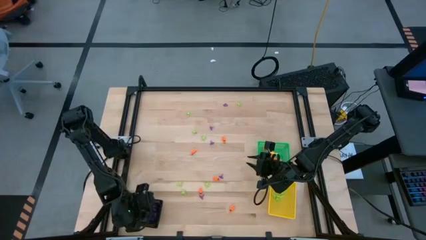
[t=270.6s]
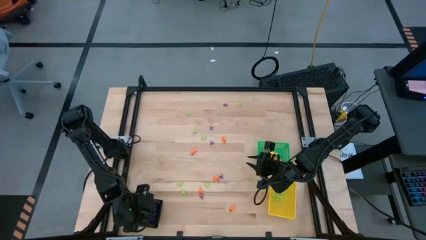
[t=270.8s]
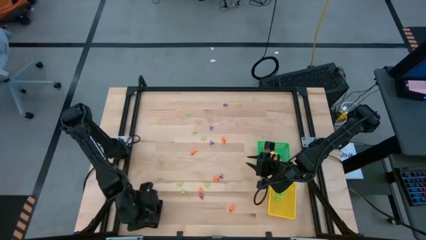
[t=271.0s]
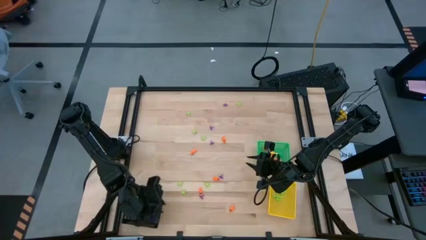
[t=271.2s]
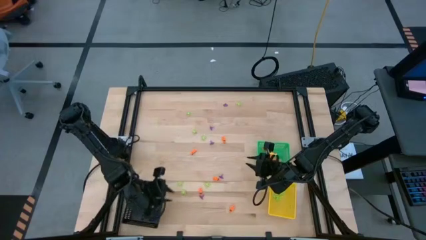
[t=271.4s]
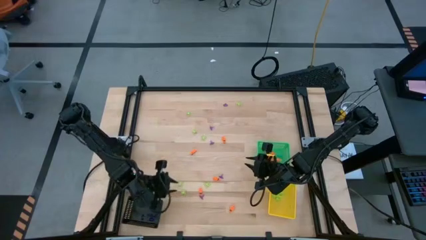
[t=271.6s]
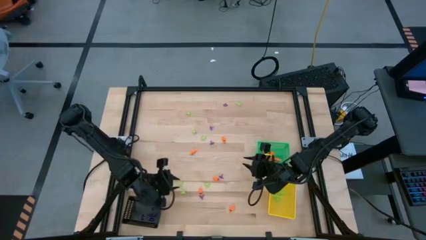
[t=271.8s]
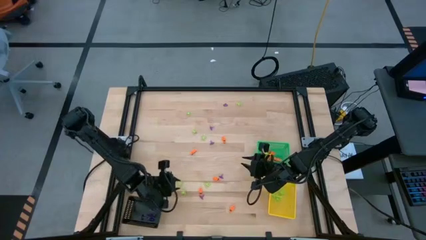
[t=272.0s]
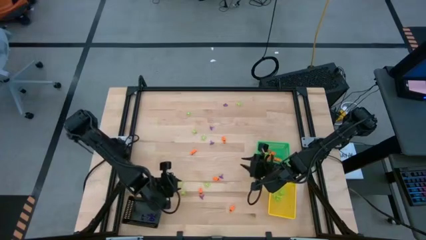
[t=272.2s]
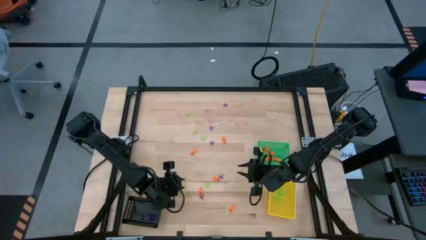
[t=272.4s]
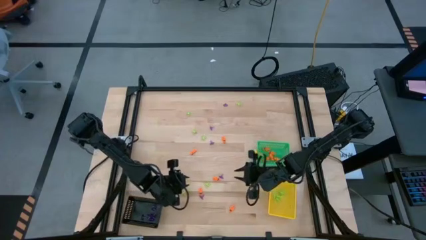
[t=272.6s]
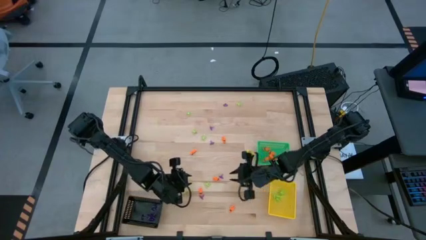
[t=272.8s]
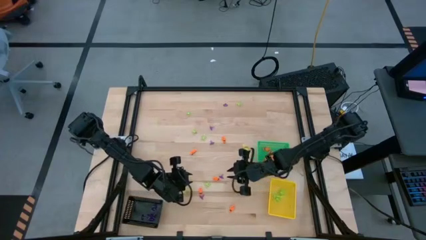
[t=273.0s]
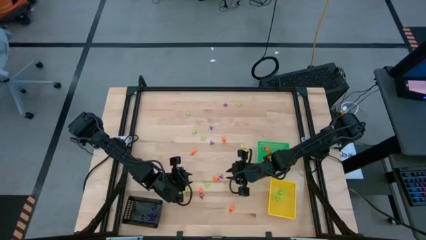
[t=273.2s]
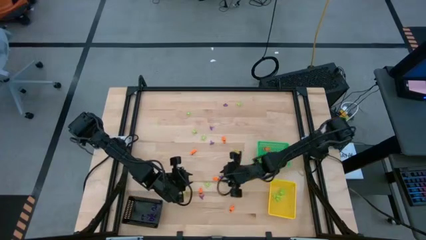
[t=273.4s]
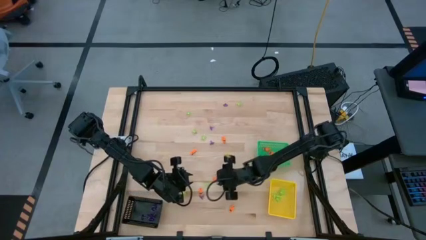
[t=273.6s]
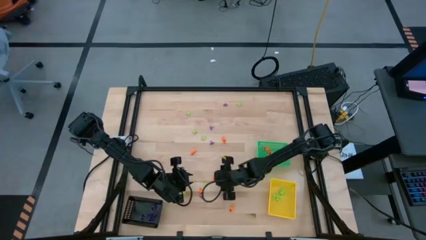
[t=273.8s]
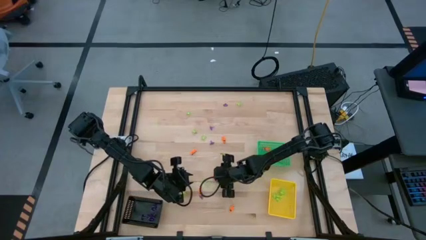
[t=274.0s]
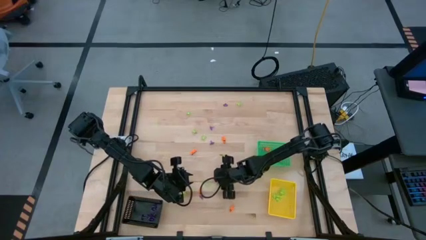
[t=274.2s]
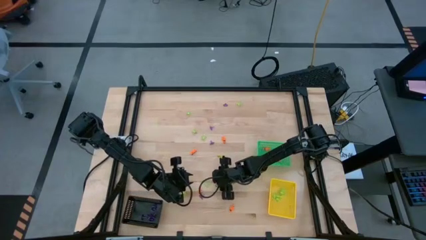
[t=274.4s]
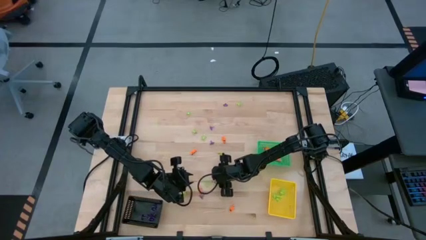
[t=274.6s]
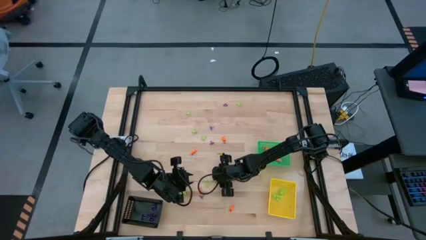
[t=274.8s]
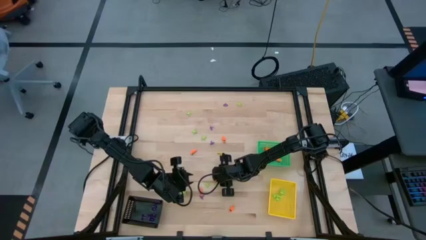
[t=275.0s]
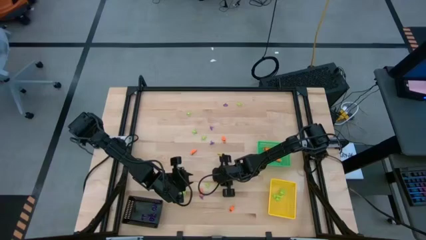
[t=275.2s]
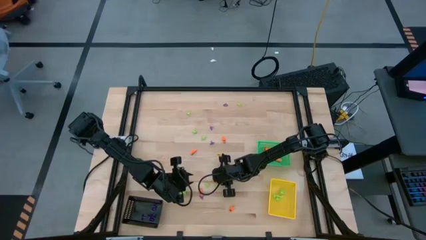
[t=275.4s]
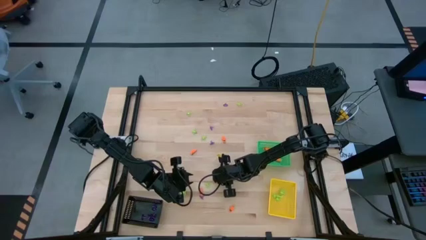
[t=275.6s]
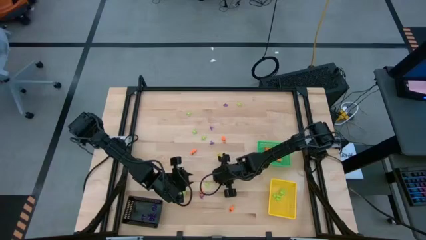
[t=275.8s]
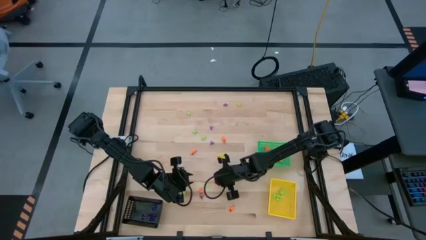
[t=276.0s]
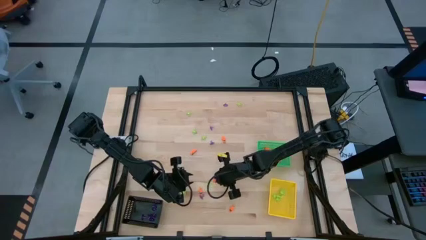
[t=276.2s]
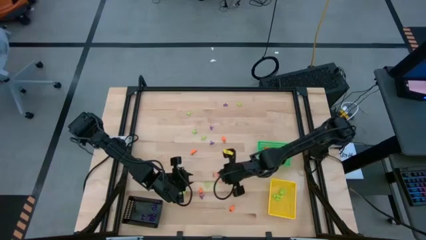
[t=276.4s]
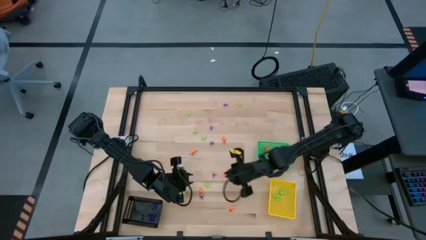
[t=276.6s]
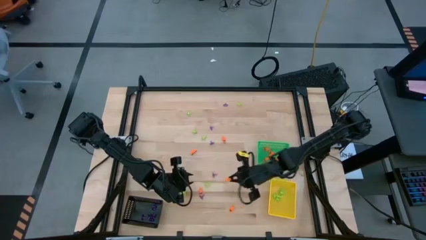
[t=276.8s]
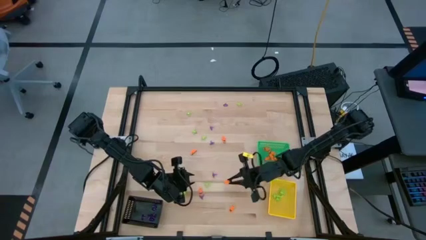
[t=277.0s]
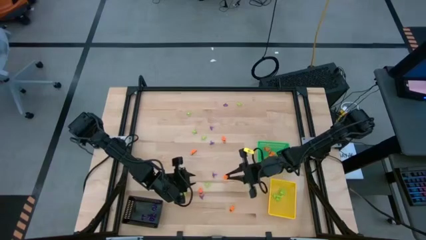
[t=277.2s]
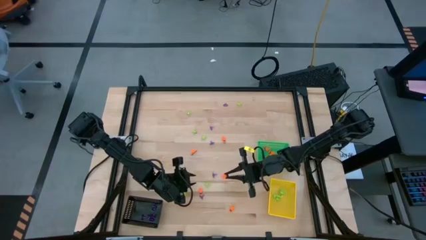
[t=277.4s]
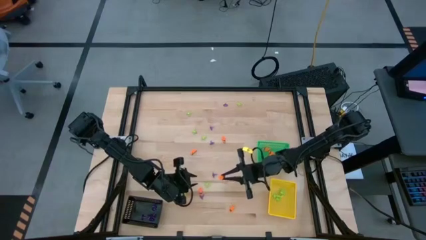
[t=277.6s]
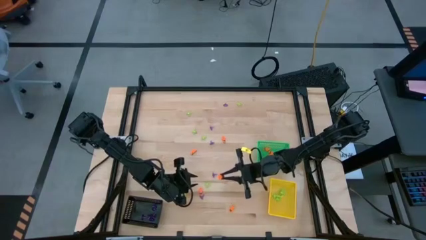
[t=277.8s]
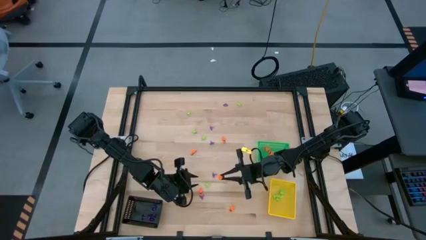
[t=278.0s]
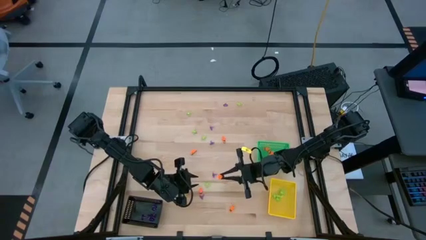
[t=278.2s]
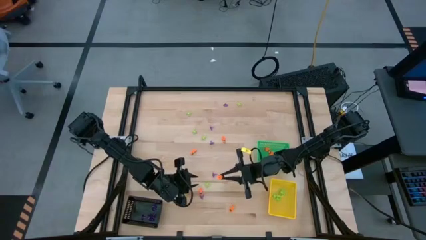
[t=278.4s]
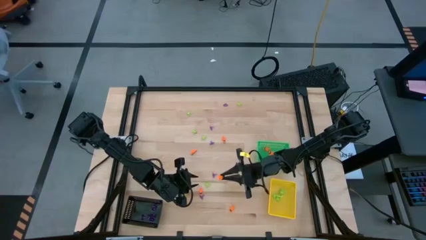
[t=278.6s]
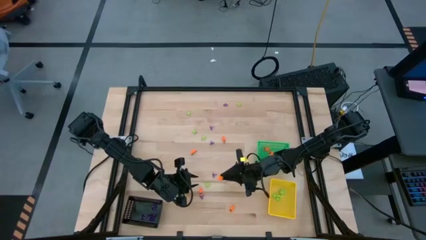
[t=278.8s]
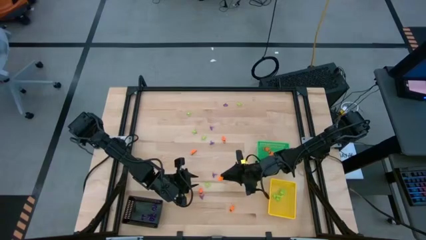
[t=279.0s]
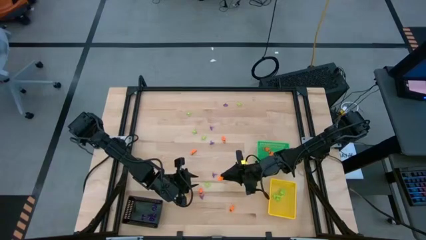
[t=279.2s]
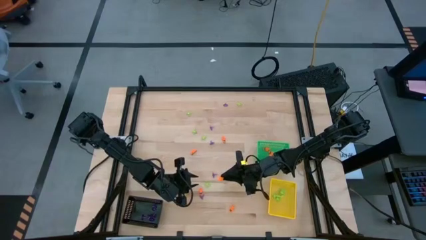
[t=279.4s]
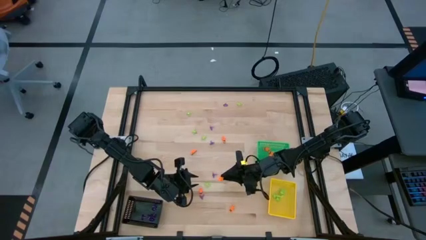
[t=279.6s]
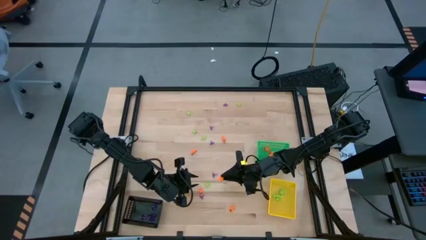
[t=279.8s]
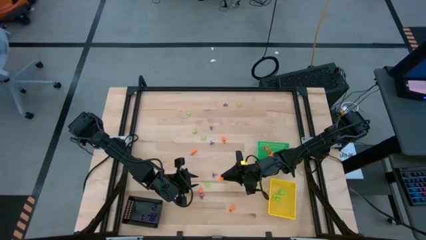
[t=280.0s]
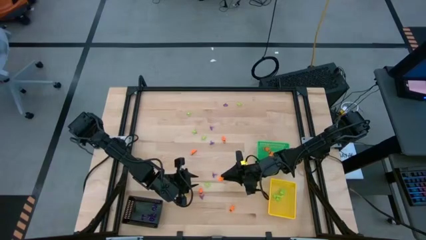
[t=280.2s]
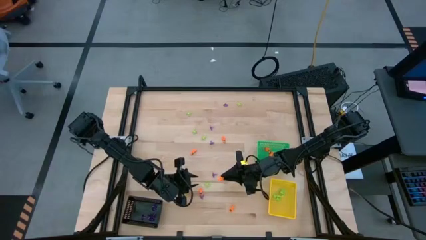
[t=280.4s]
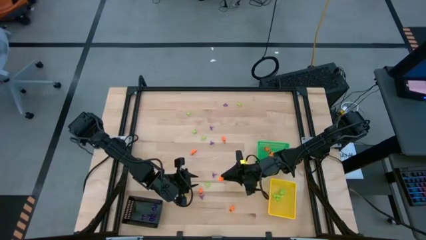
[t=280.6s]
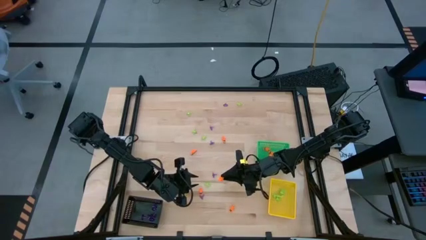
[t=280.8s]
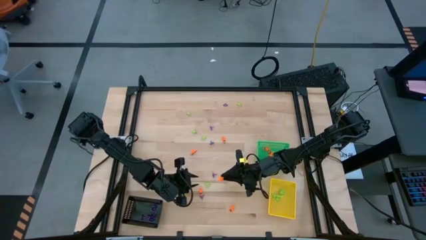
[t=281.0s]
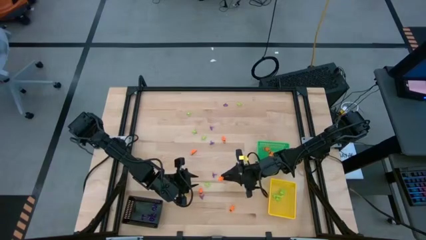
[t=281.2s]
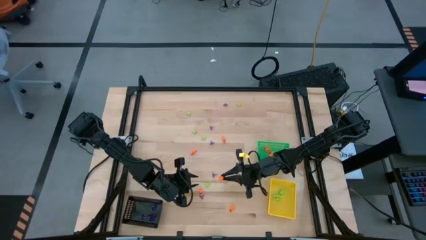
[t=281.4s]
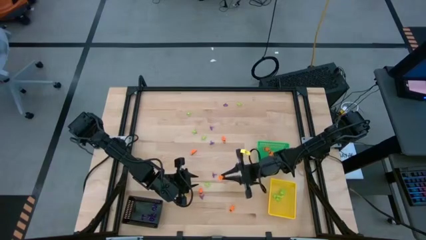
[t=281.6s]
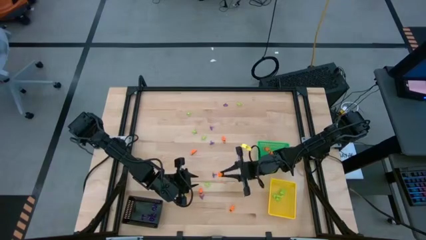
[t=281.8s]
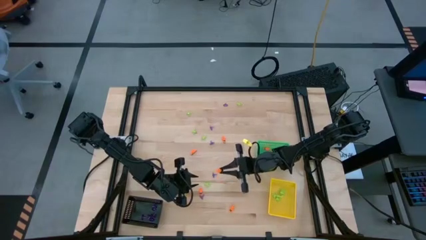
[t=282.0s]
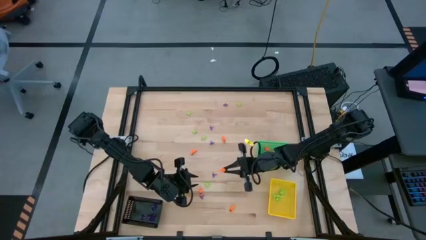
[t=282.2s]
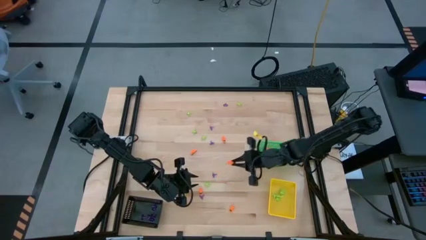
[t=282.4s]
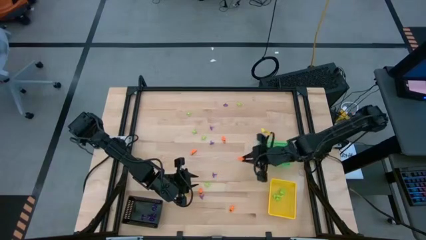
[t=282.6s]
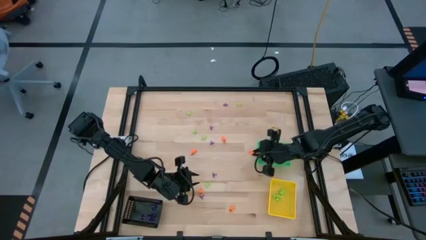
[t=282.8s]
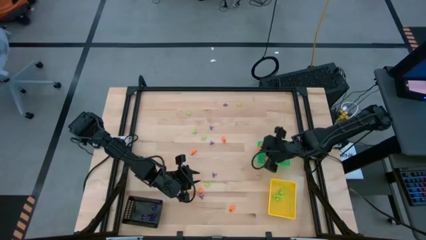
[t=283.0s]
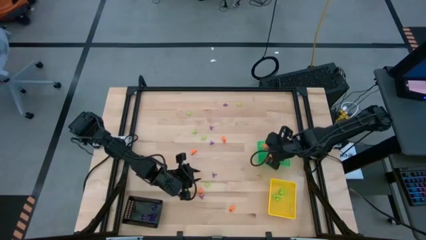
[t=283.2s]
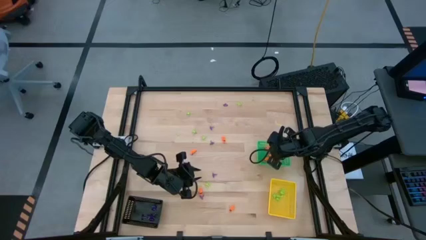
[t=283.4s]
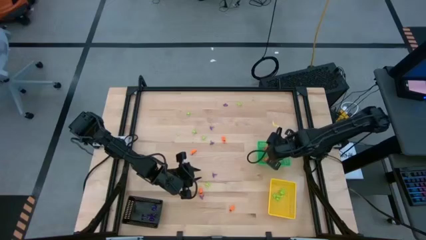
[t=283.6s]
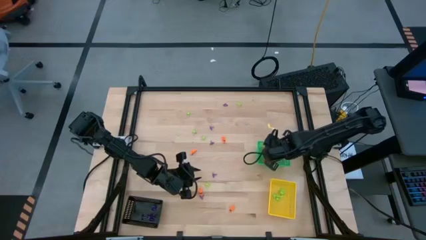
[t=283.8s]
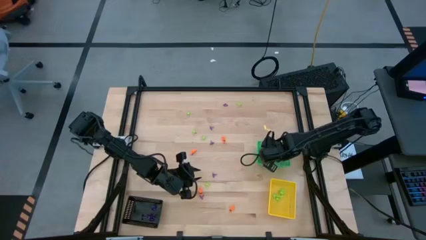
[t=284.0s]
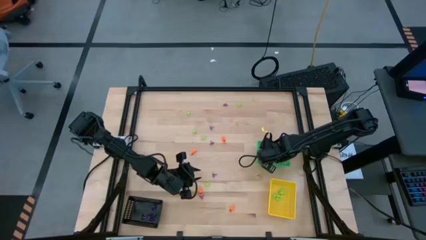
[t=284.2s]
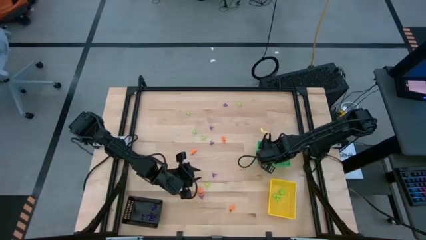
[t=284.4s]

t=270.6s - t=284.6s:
Task: Sort Halloween decoration
Put the orange skeleton toy into the green bin
